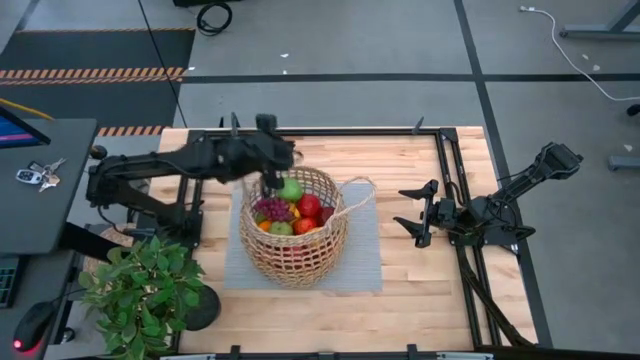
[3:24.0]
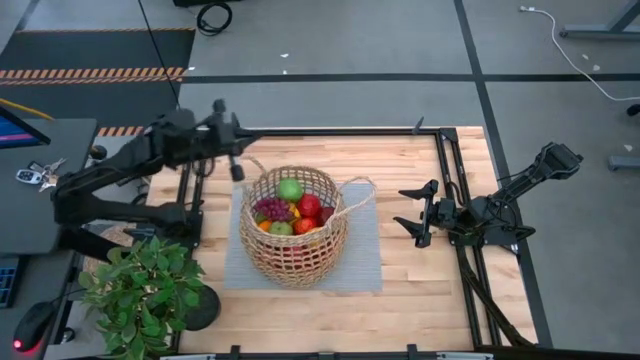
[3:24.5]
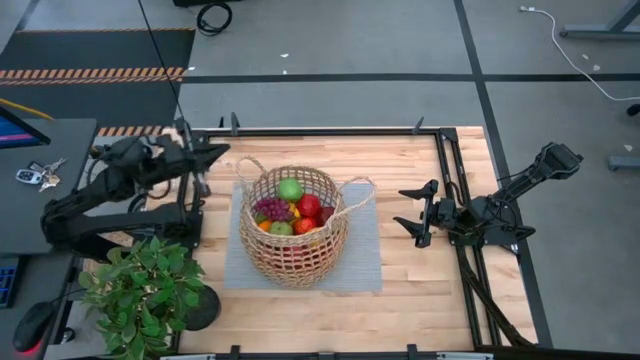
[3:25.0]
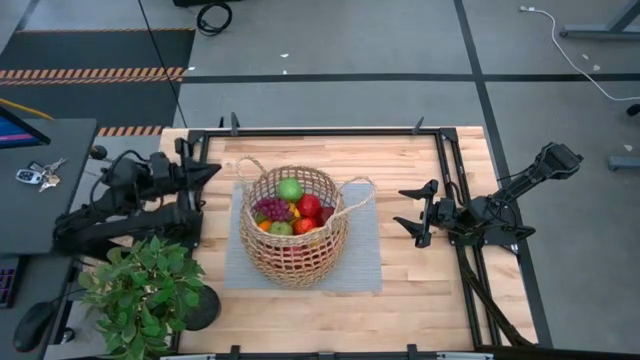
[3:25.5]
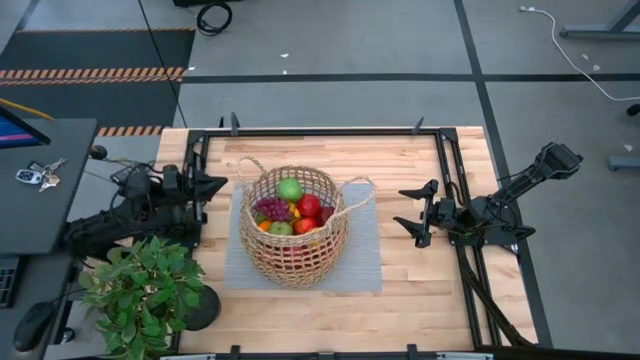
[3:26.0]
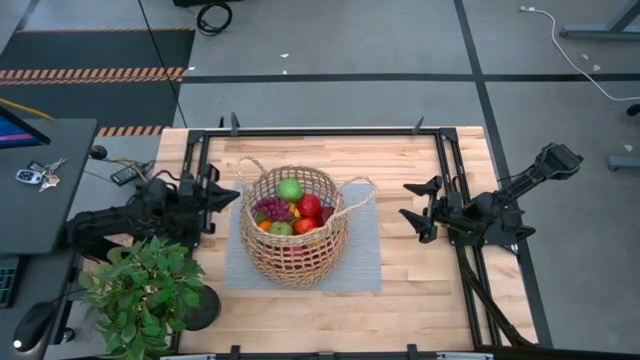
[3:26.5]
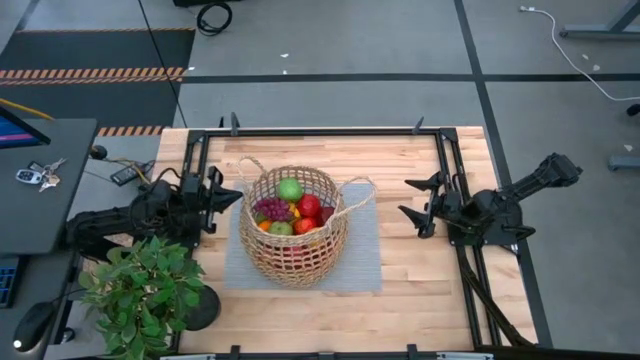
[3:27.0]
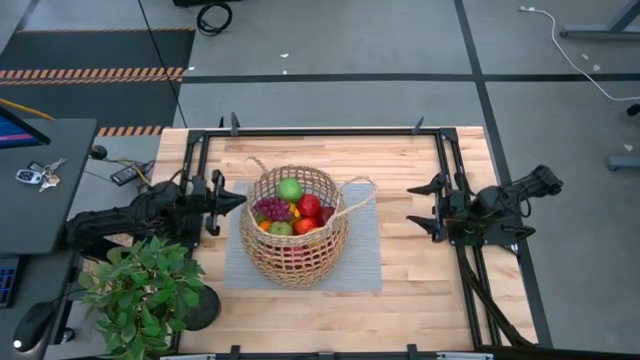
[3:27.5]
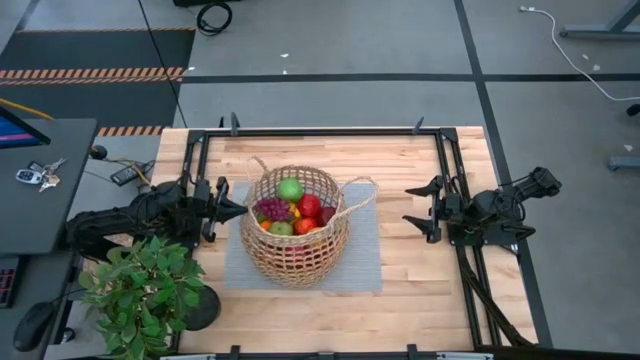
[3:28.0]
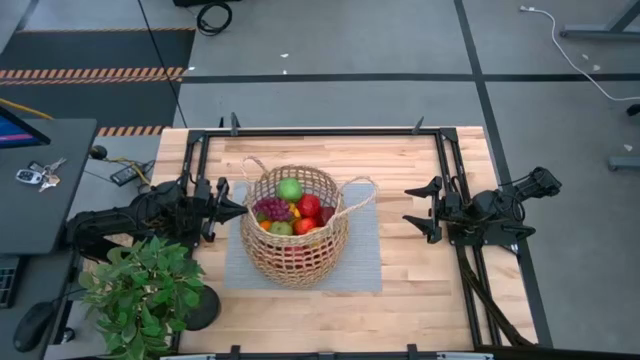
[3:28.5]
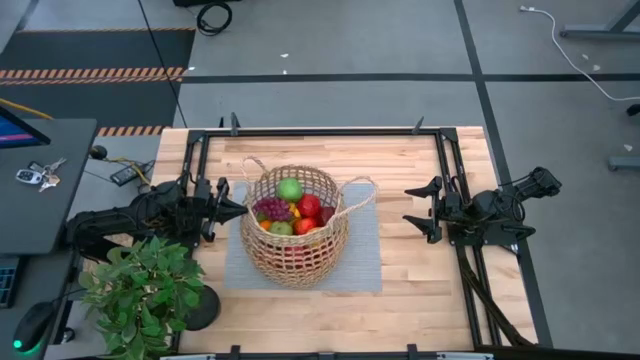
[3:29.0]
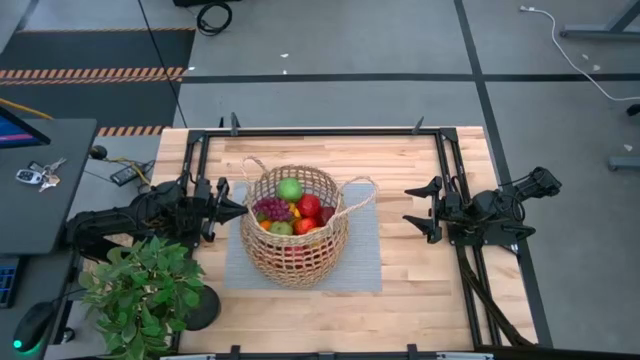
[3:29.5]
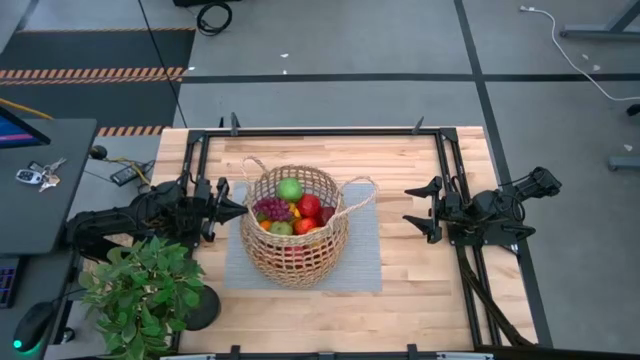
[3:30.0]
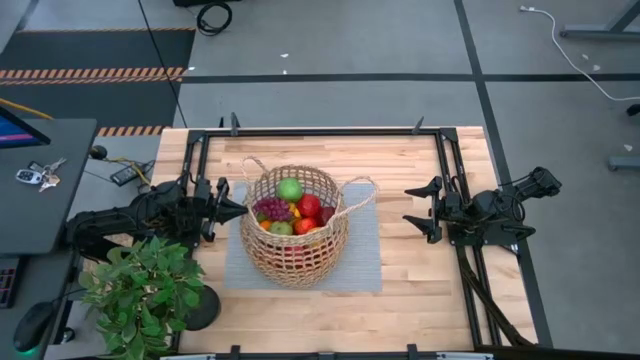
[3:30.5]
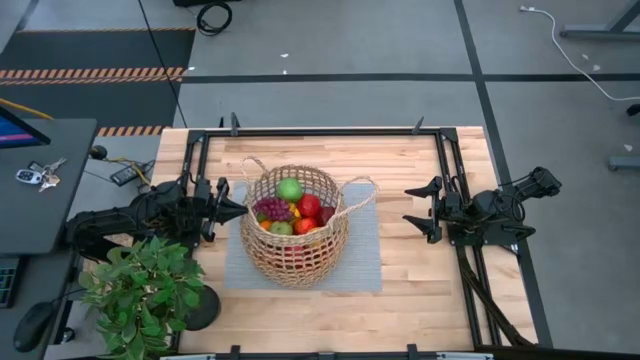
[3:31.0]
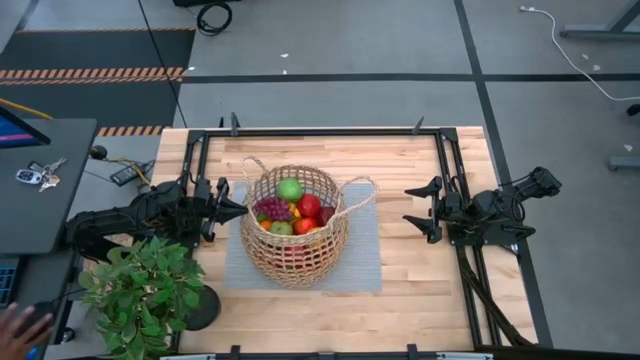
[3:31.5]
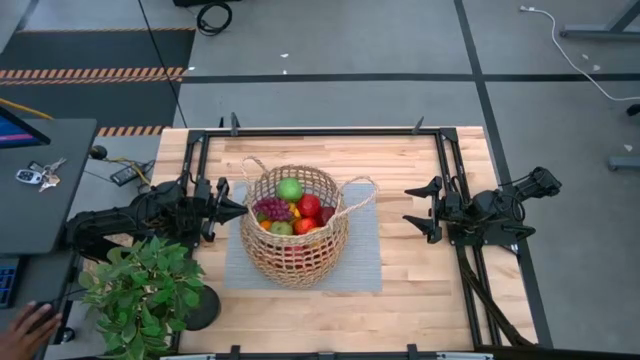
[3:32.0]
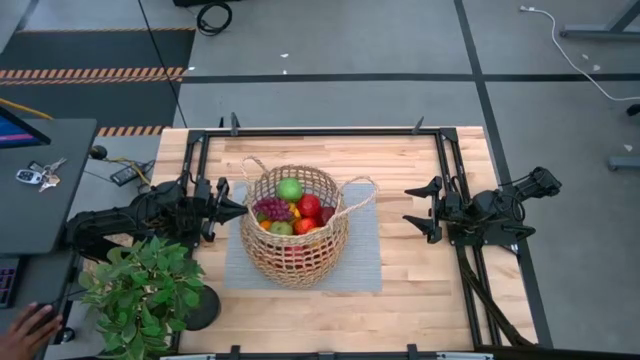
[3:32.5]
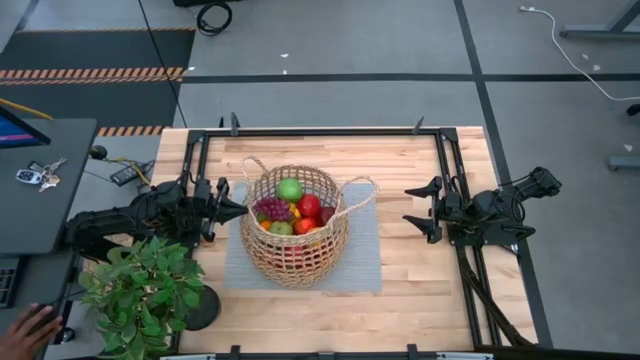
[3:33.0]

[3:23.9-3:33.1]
Task: Build produce basket
Return to Home Position

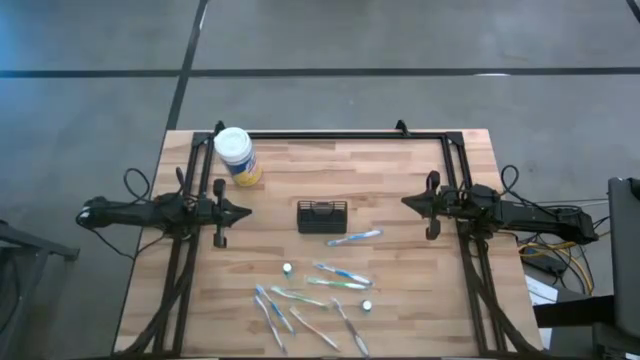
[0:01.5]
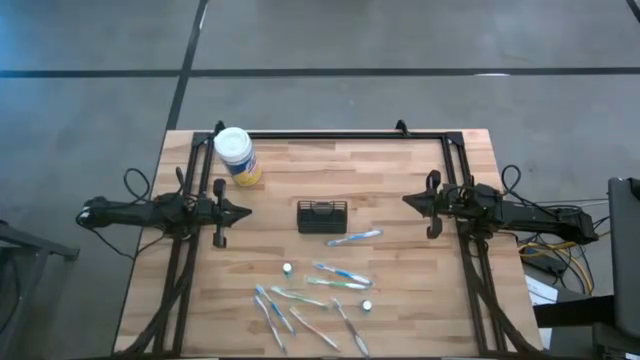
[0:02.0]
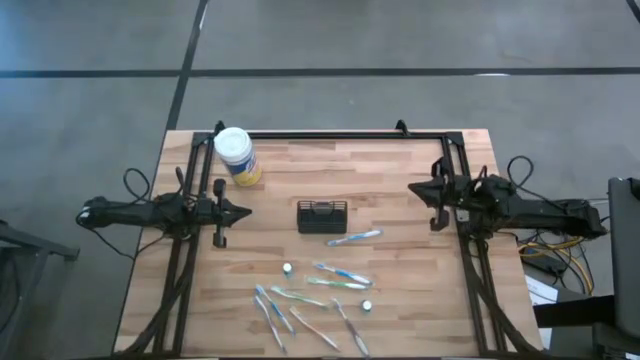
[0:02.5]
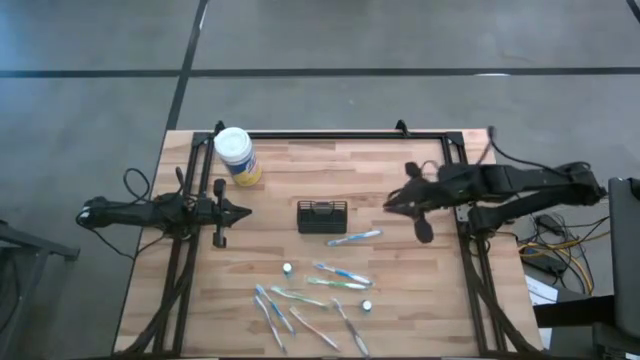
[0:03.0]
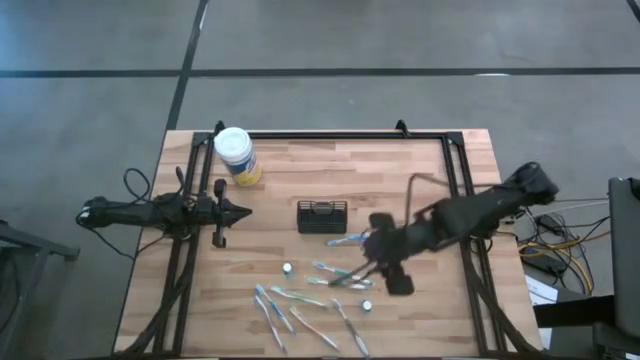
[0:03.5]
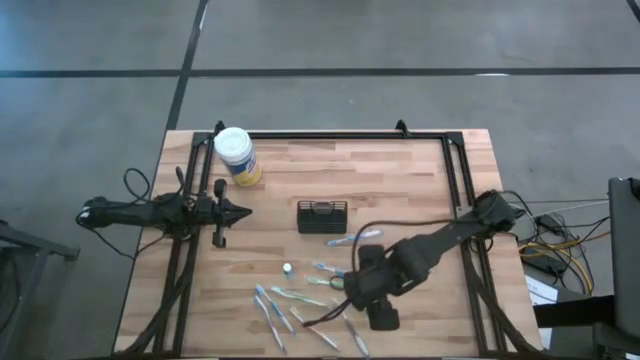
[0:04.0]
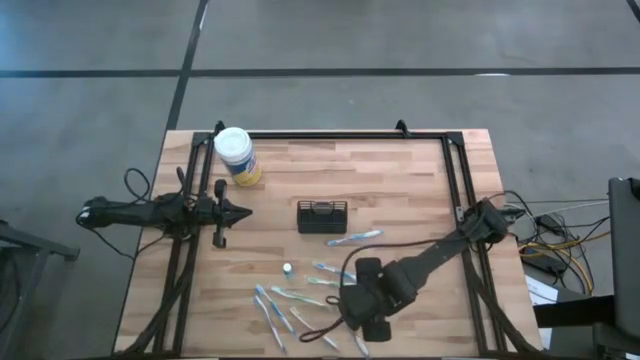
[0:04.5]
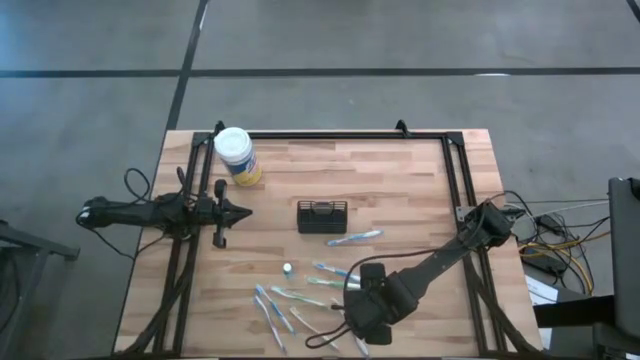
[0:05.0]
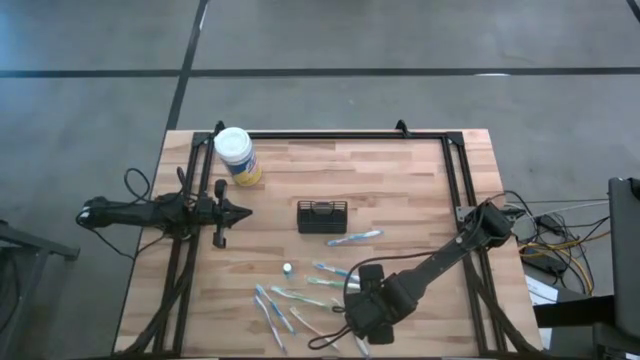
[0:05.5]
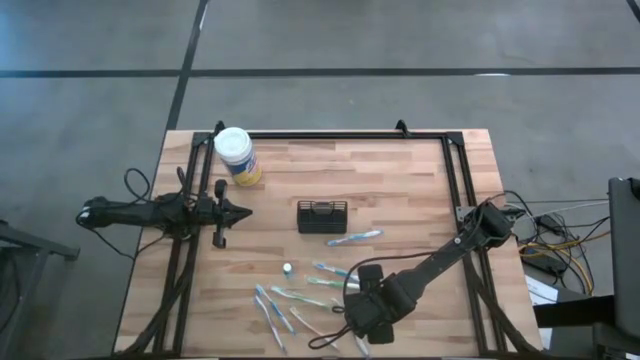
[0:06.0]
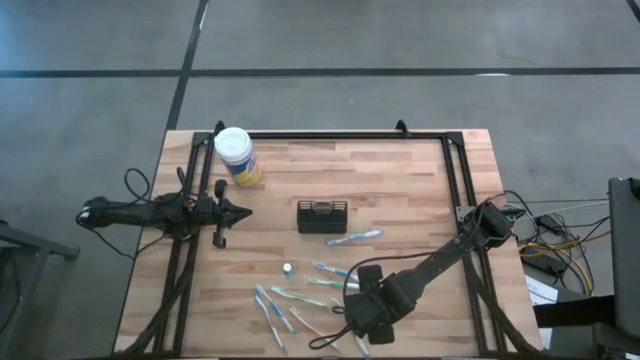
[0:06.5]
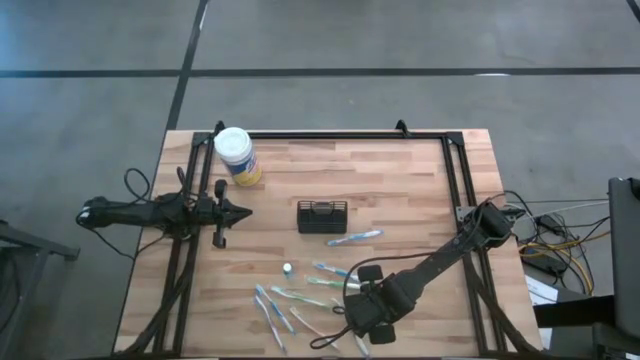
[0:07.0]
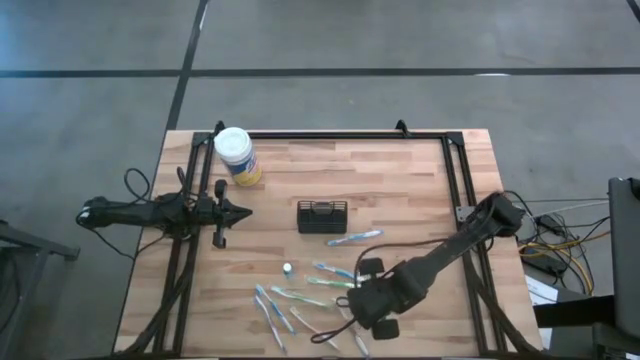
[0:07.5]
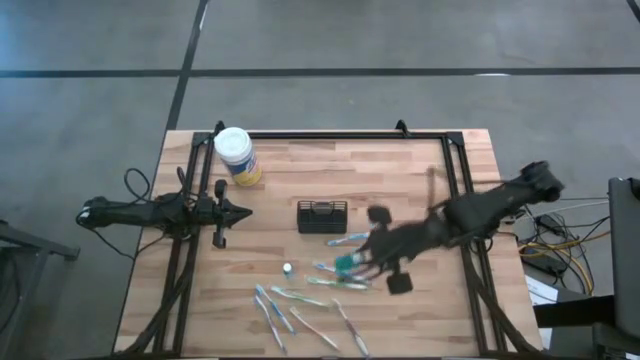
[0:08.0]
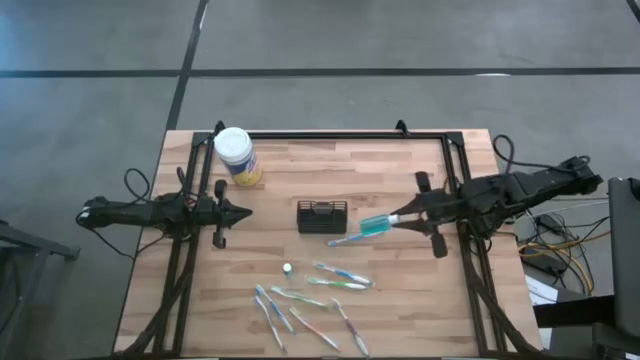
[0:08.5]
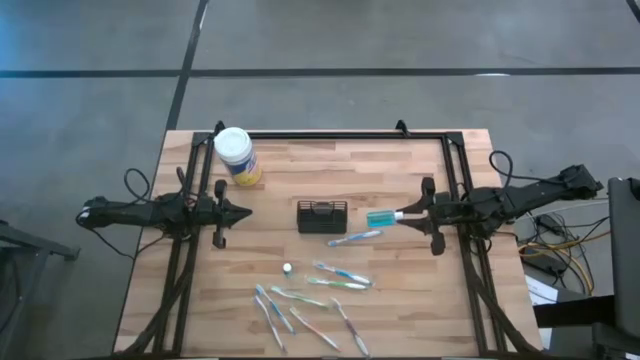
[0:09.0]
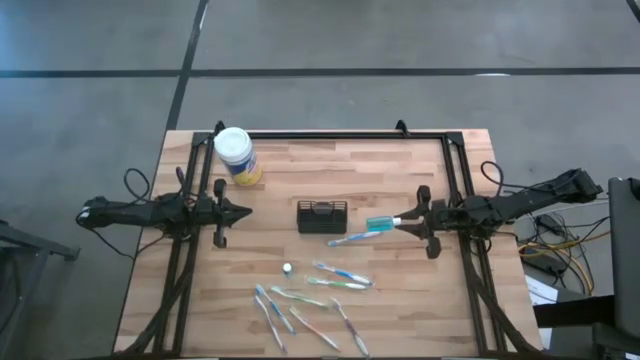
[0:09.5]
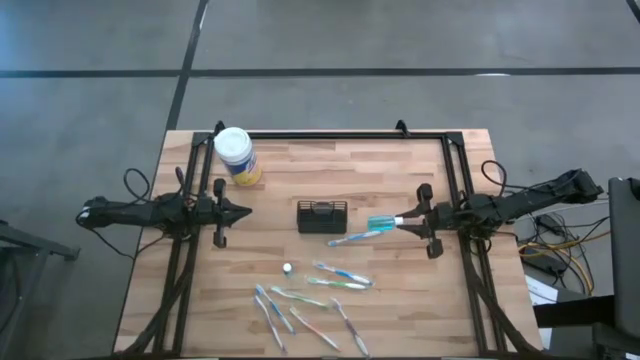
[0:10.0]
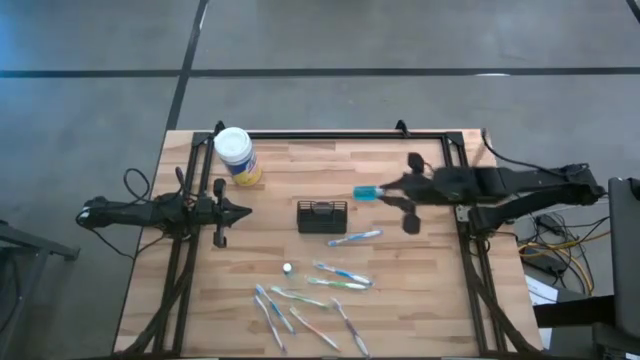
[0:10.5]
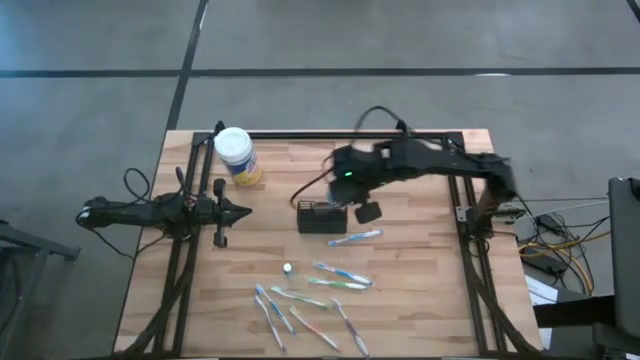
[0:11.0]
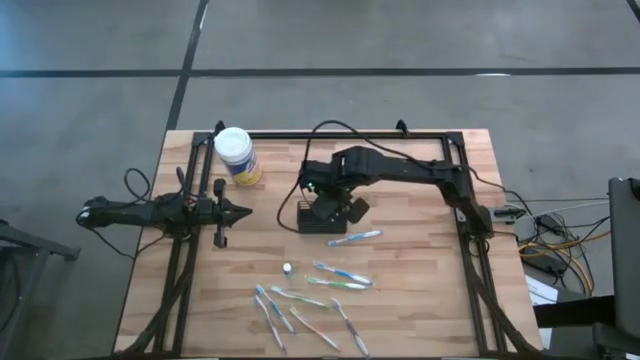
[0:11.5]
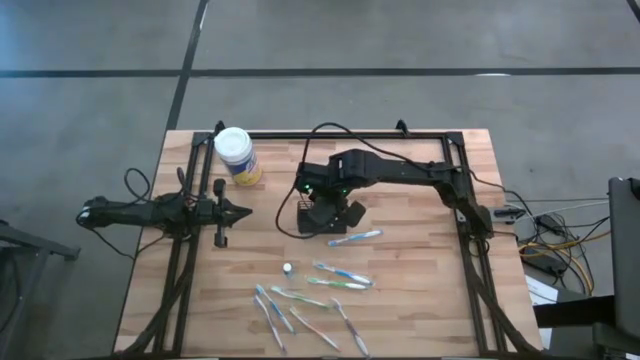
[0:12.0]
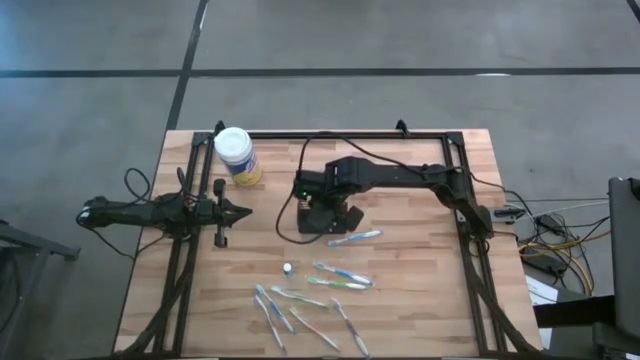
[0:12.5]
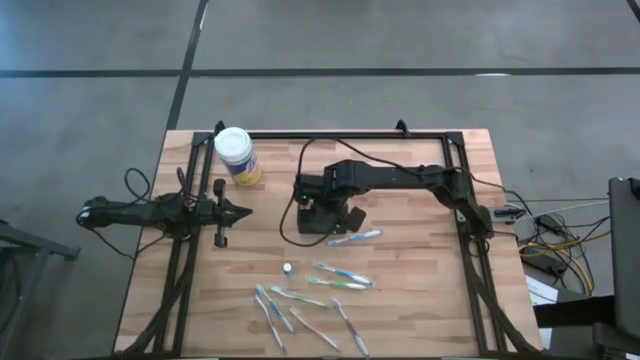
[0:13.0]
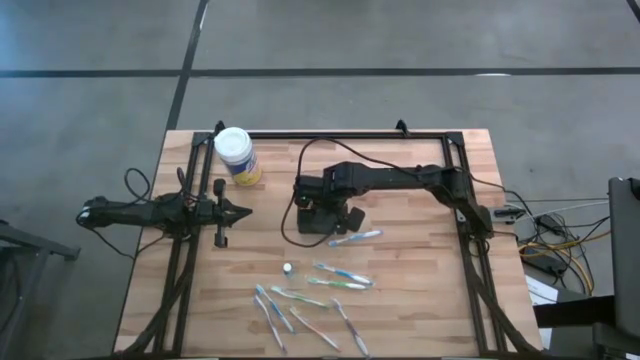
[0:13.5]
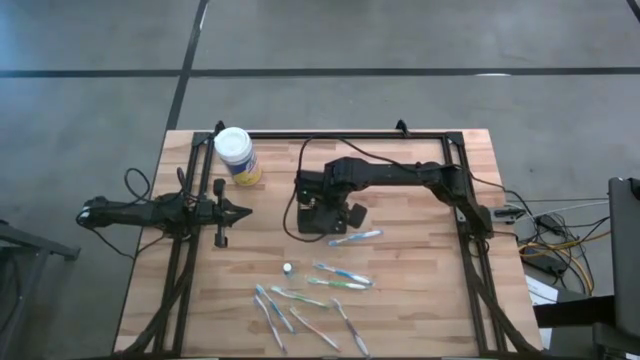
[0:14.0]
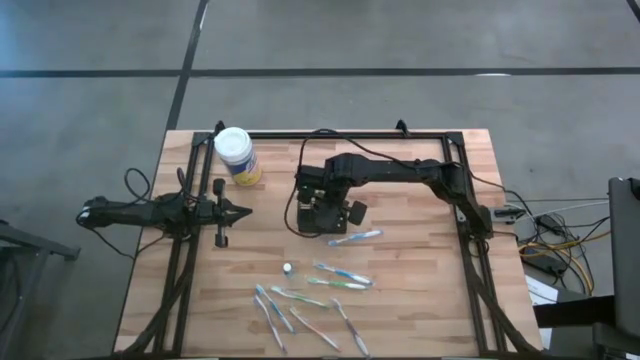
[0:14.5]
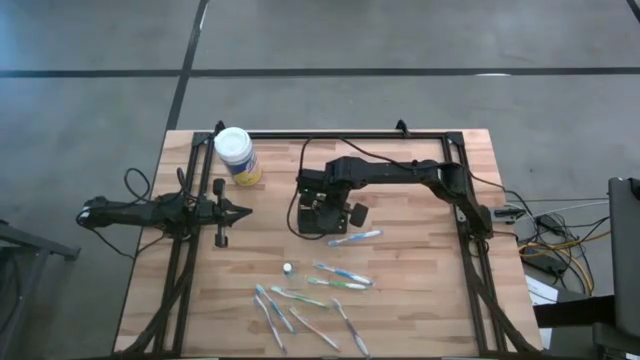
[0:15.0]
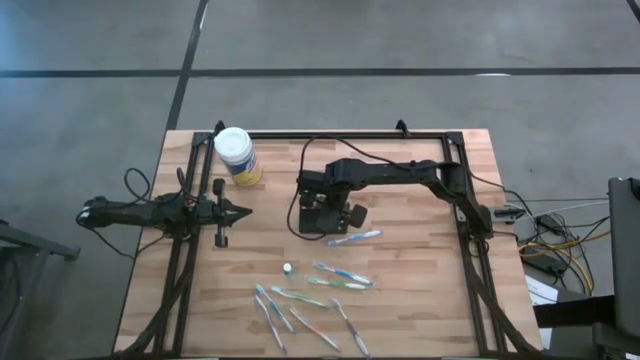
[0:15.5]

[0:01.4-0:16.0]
Task: Pick & Place toothbrushing station
Put the right mouthwash into the mesh organizer
